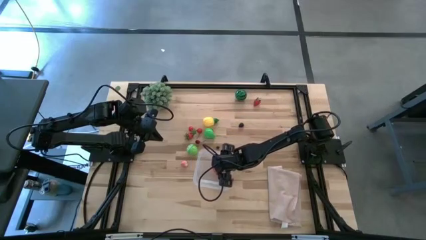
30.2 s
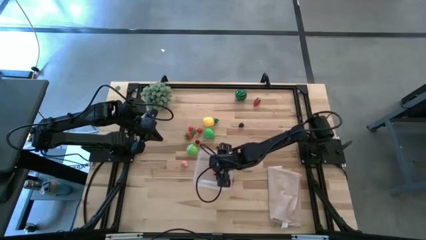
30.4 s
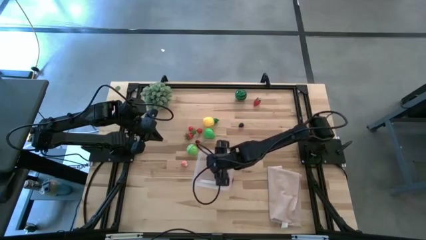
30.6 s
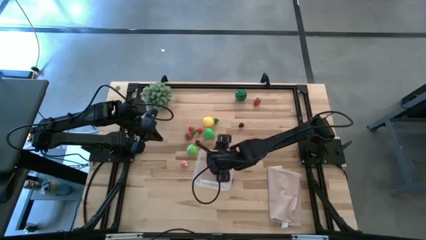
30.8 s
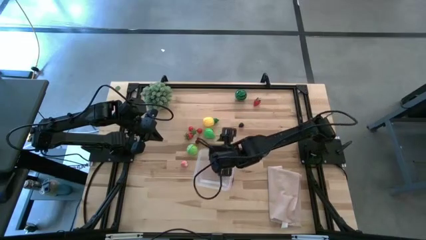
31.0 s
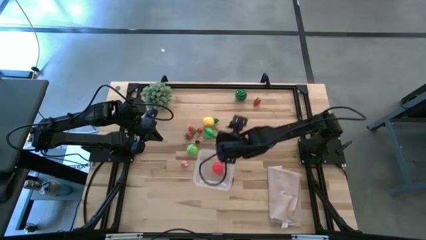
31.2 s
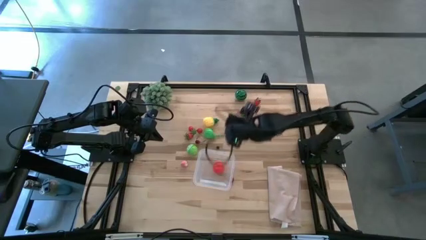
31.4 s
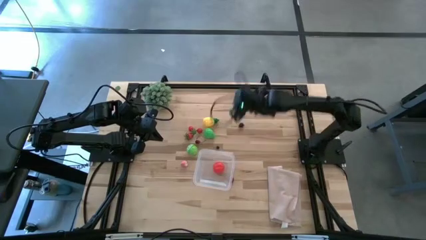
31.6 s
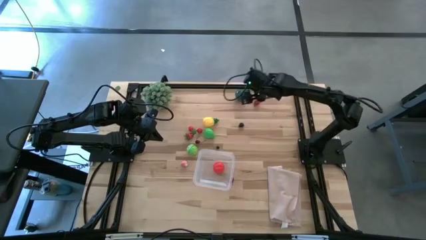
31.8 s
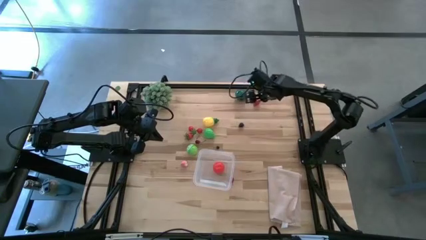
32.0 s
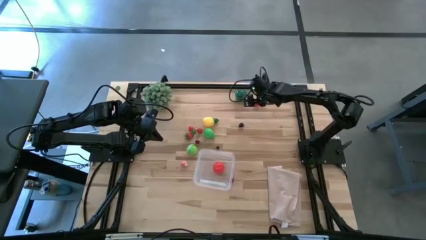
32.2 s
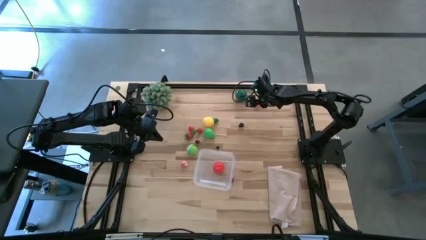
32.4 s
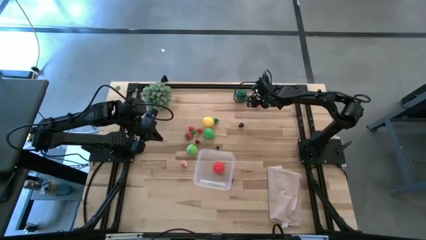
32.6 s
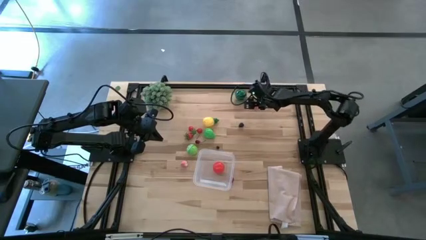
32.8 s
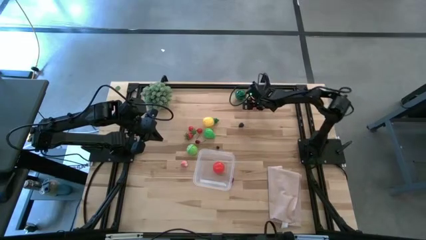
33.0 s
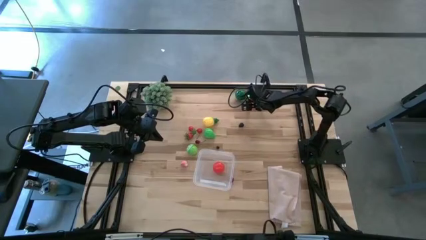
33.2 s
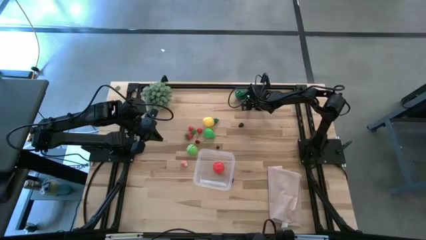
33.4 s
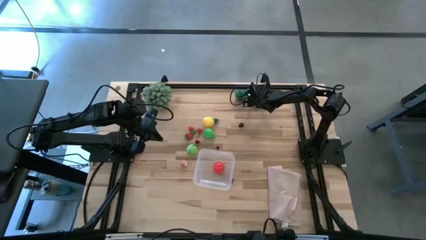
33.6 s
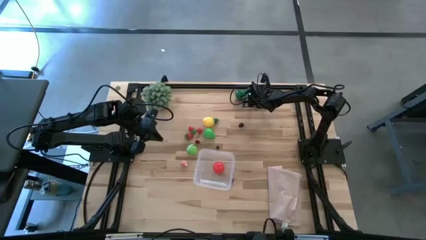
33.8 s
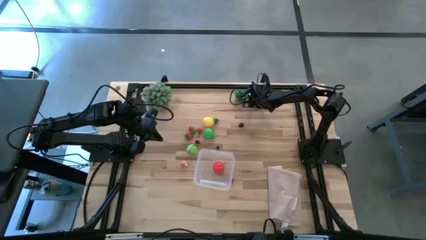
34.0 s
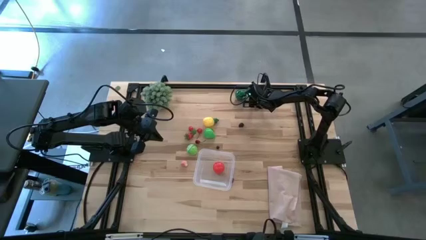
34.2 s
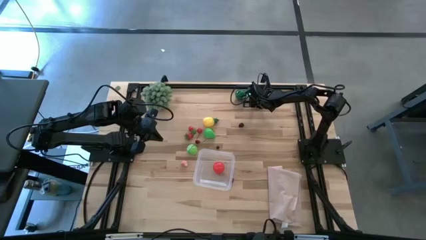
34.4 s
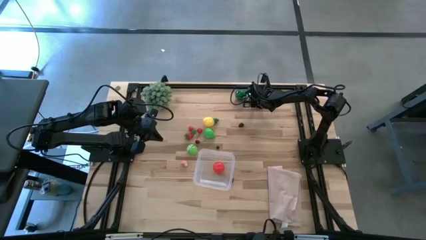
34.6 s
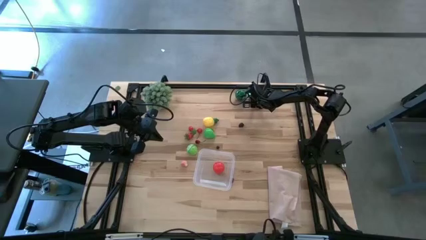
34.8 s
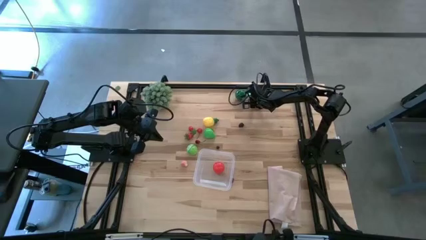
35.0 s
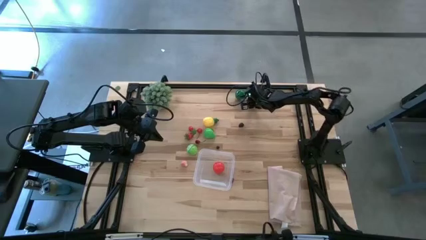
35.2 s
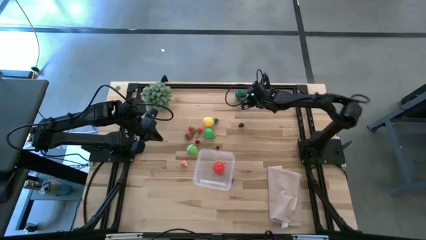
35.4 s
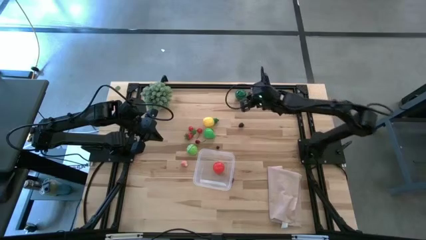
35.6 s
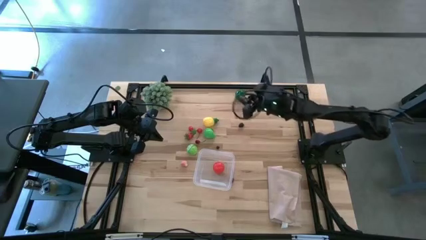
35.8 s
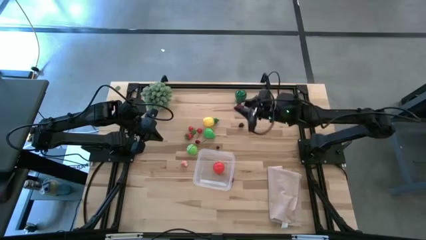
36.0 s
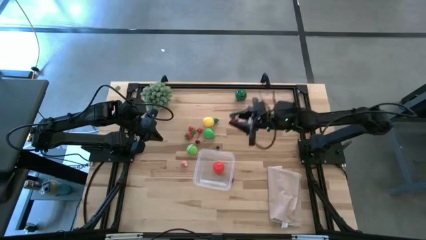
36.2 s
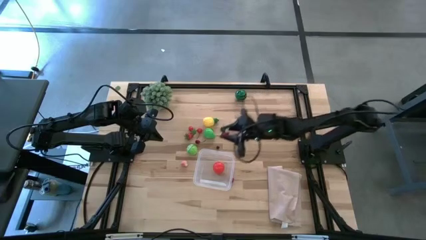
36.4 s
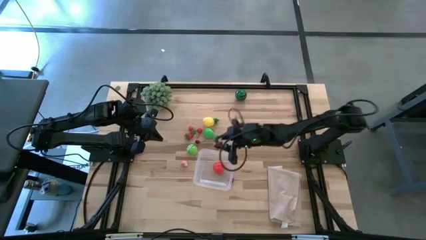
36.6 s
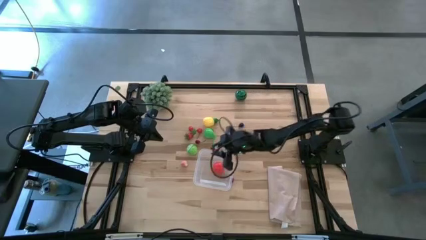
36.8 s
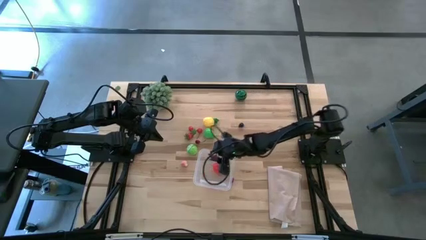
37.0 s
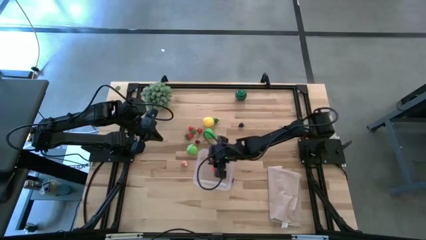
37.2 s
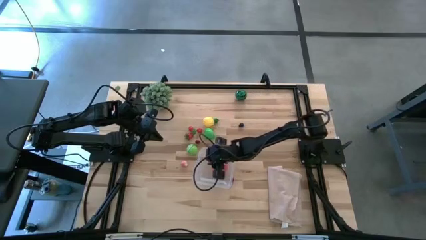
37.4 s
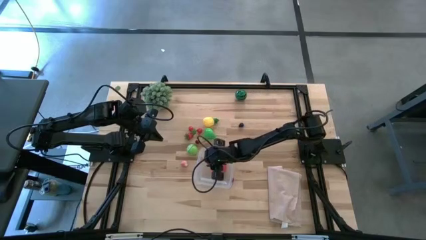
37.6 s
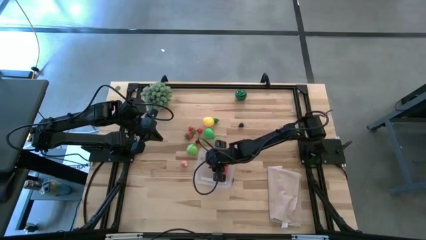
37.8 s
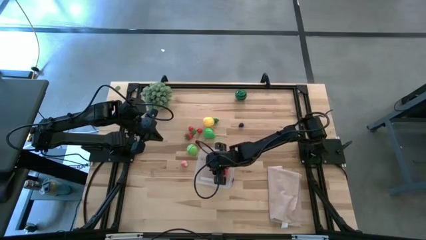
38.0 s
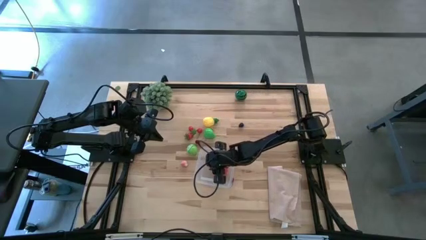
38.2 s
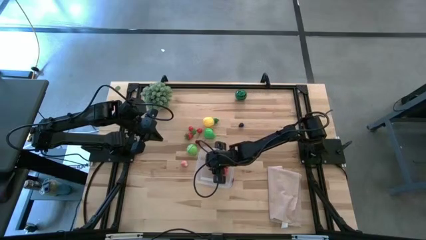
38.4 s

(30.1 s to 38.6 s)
Task: Pick and placing Produce into tupperware
Put the red strawberry into the transparent bin

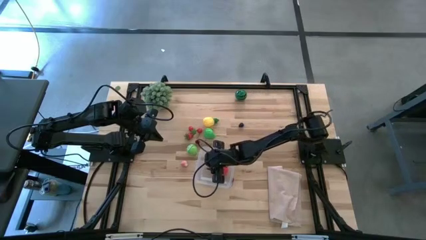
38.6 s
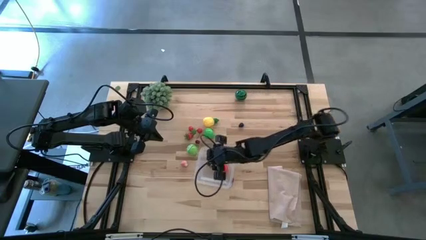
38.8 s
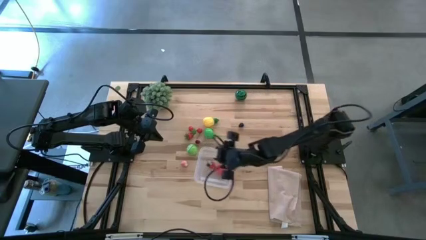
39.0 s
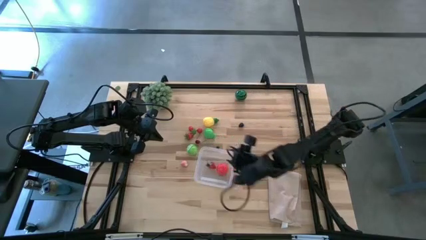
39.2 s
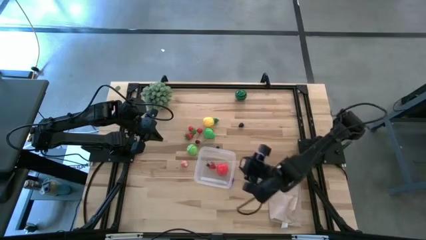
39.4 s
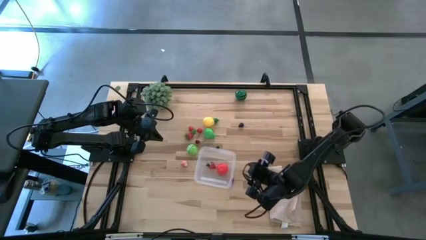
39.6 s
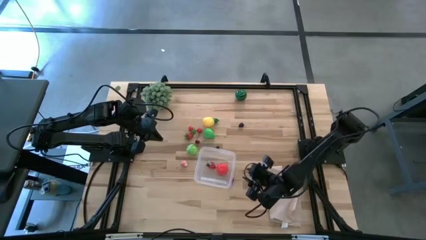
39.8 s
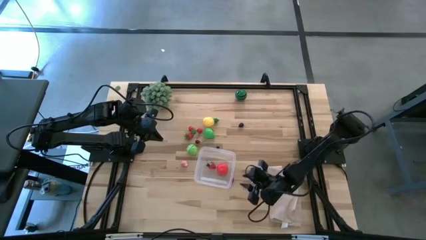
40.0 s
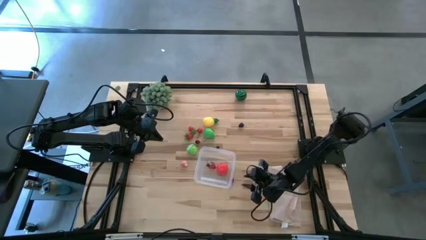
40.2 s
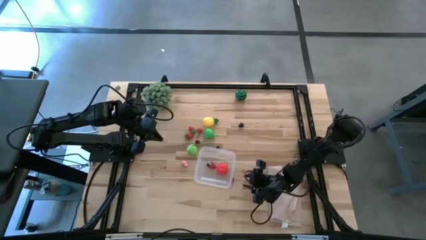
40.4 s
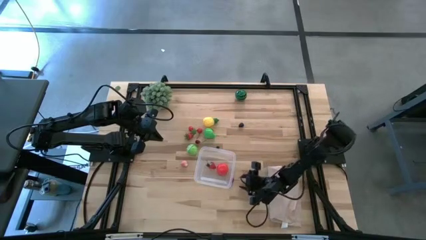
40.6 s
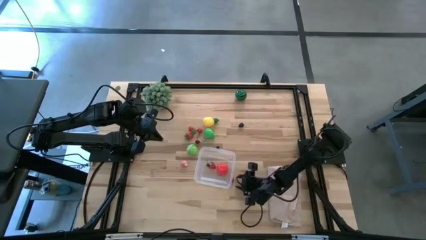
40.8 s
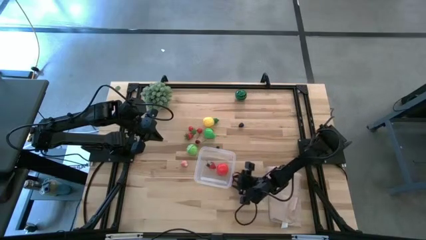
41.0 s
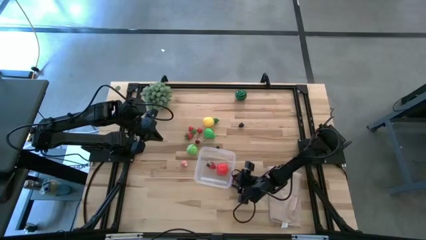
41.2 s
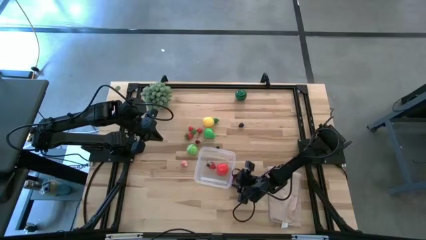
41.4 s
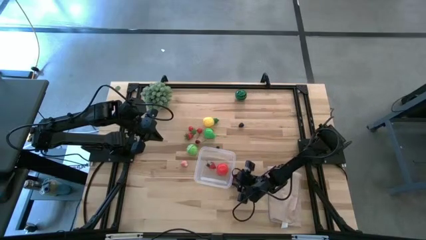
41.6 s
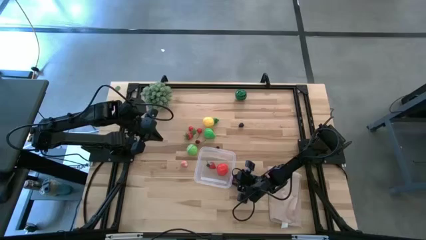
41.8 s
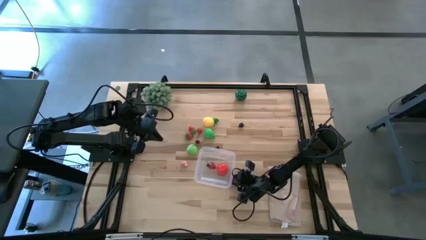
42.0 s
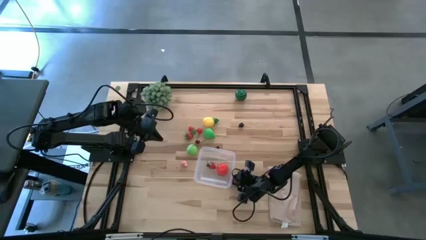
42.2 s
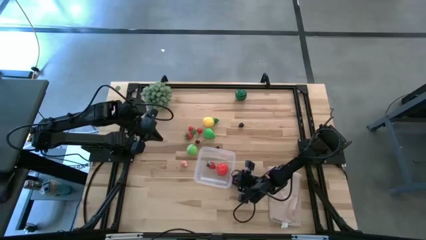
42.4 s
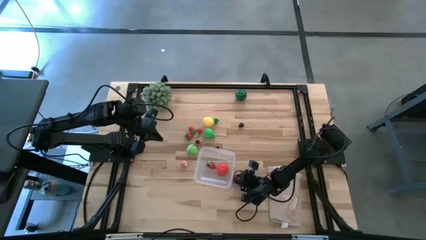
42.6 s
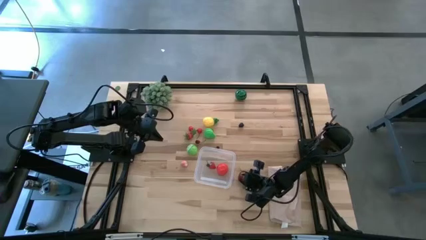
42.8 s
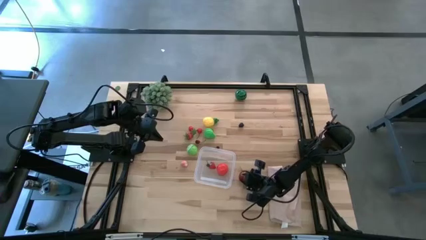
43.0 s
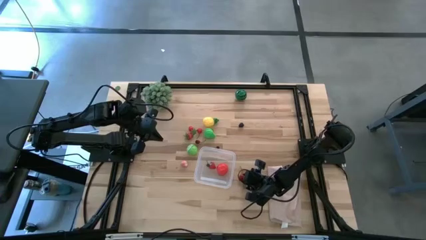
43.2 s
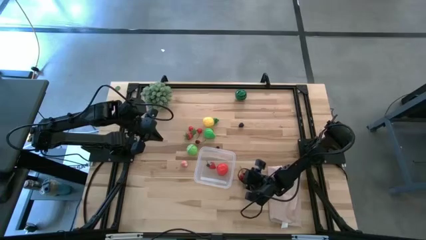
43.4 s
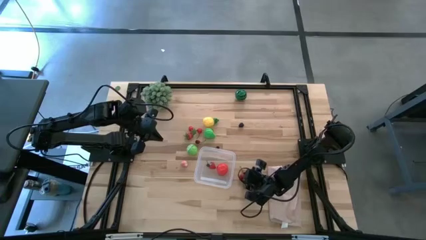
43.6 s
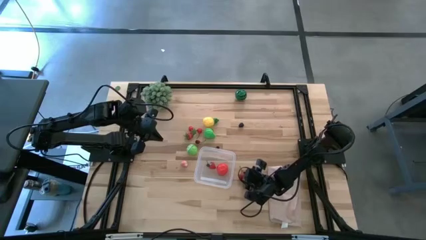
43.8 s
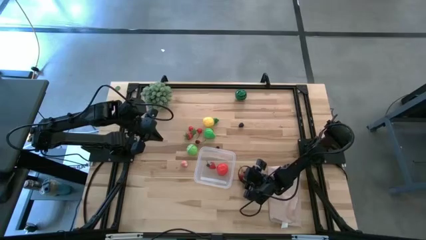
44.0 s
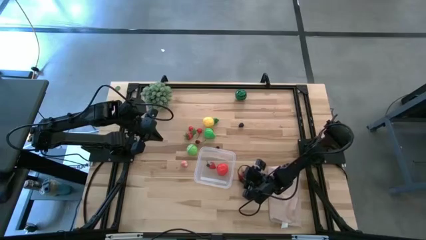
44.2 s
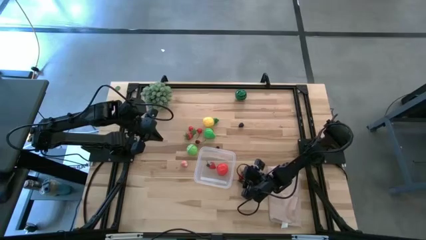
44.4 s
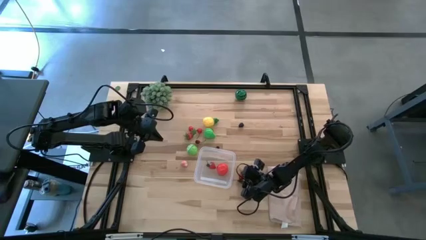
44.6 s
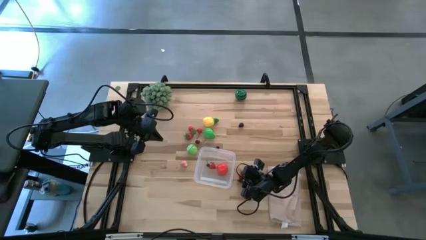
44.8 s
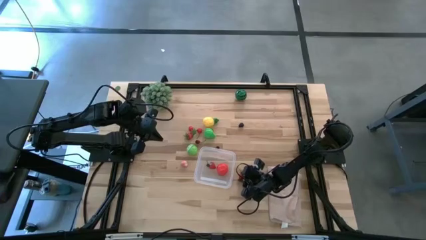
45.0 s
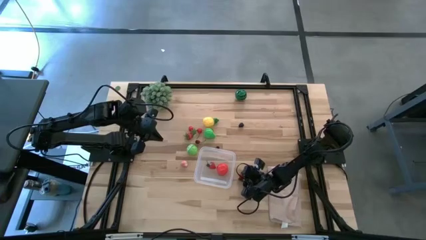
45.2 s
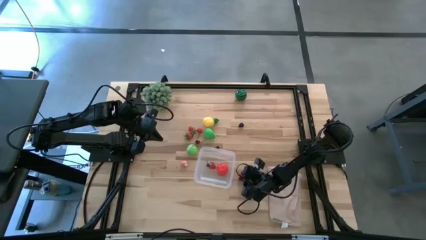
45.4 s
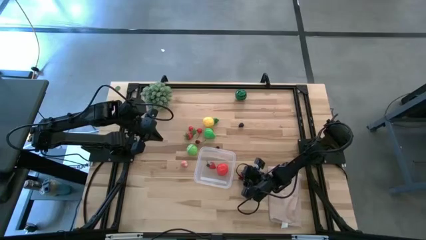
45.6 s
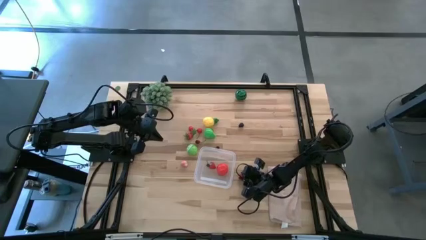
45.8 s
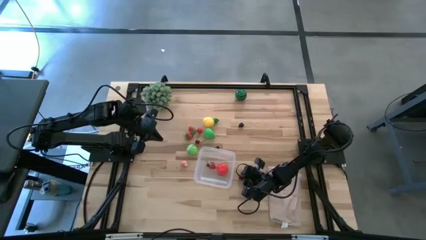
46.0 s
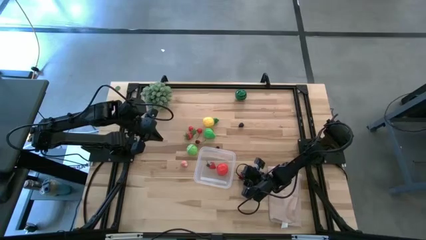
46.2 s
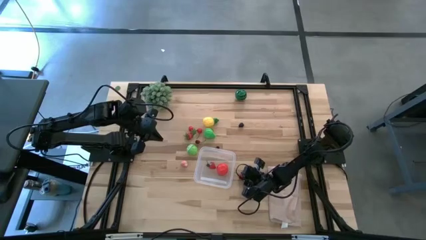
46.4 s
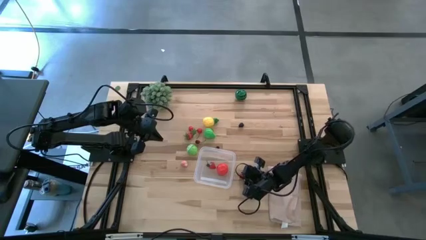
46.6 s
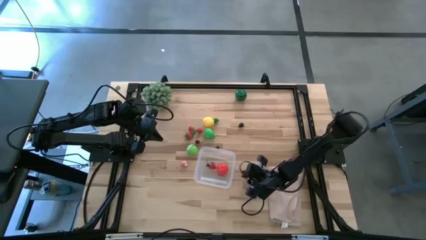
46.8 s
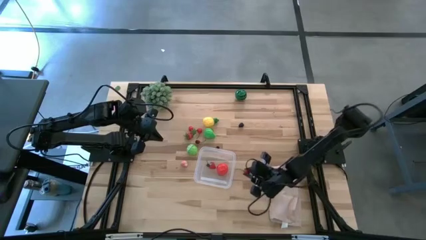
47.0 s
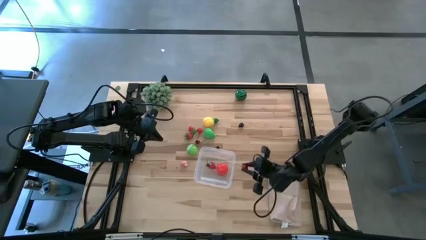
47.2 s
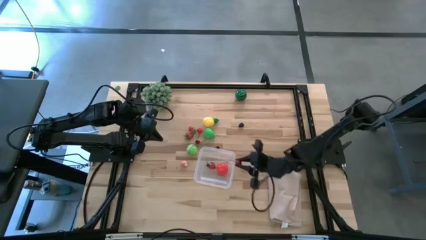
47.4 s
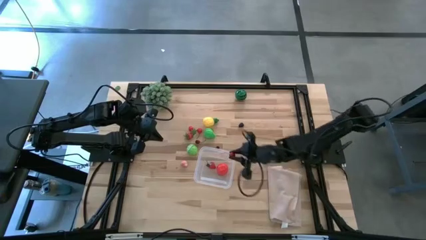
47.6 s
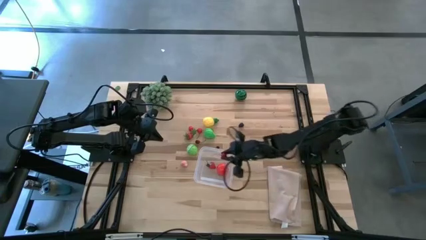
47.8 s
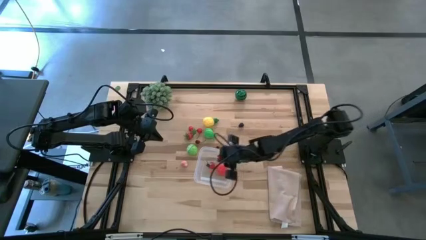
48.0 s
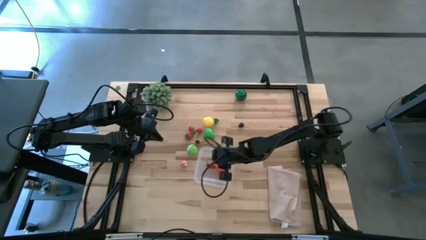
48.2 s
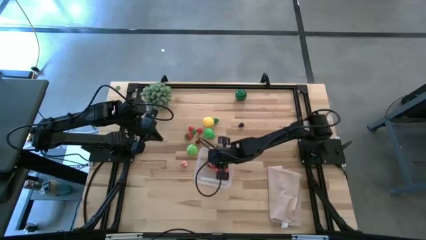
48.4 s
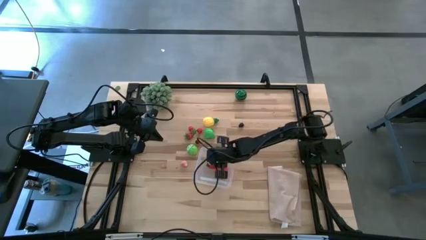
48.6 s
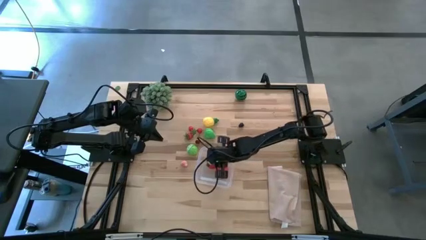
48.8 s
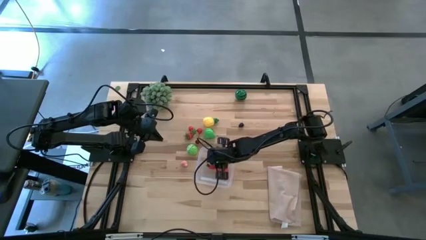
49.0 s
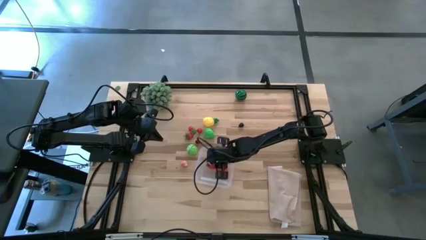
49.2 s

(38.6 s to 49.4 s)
Put the red cherry into the transparent bin
